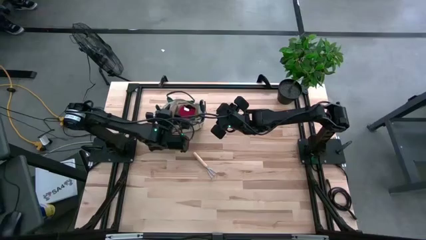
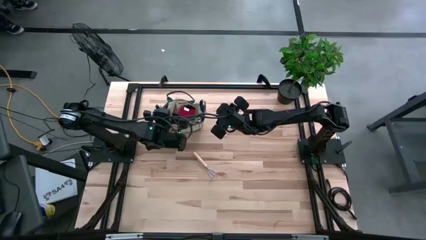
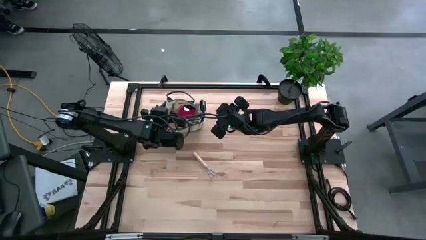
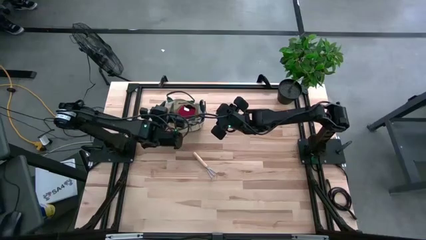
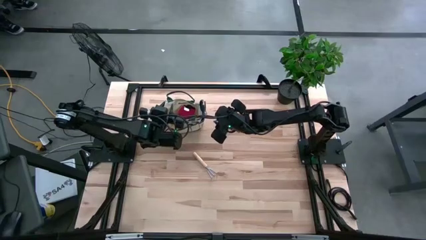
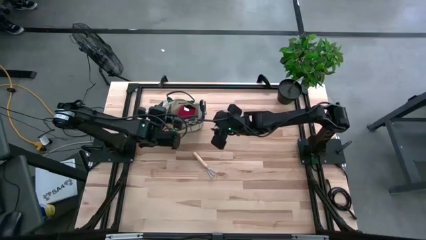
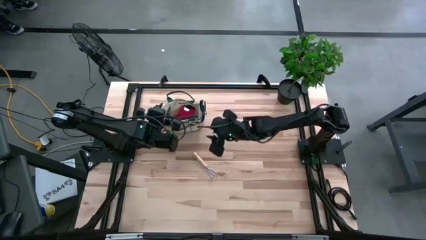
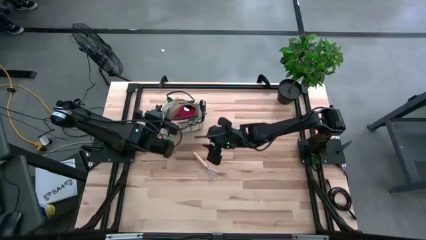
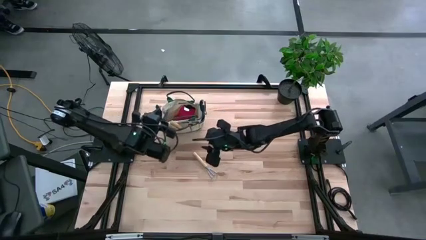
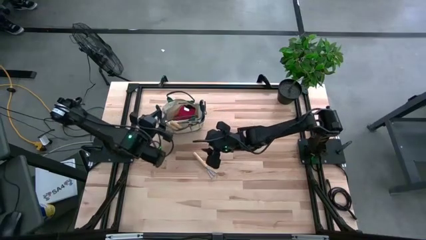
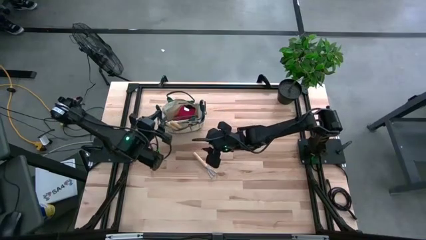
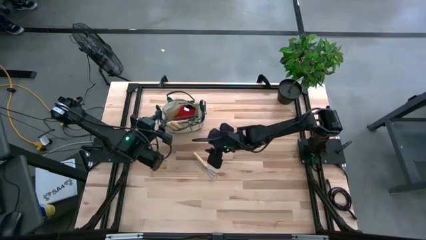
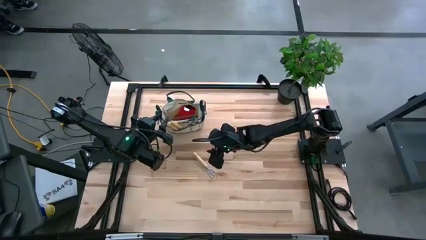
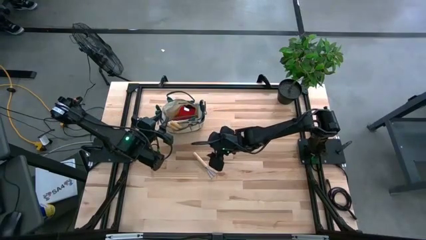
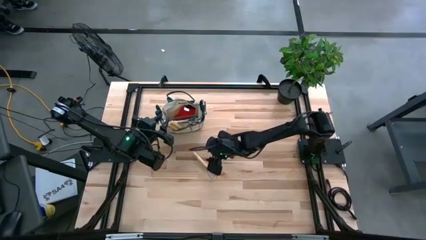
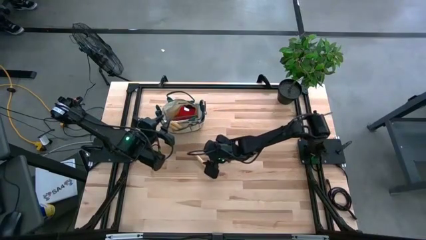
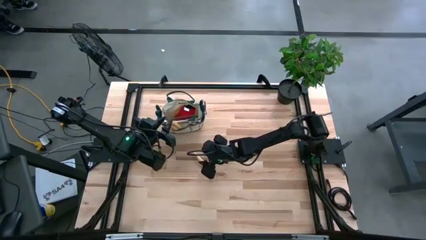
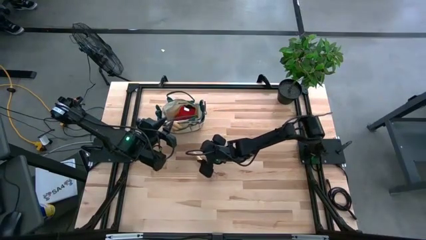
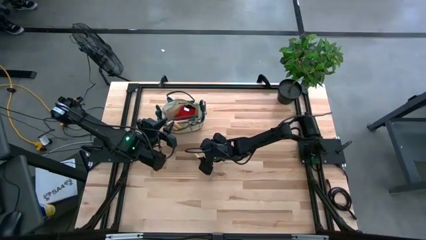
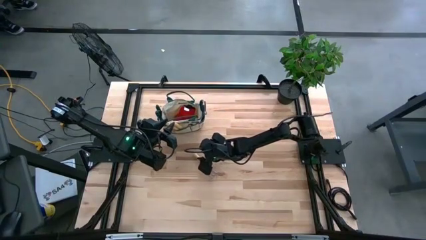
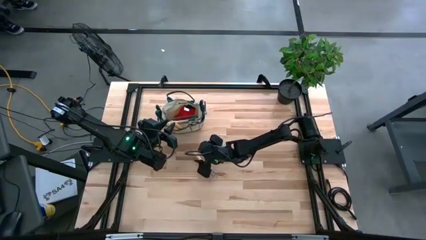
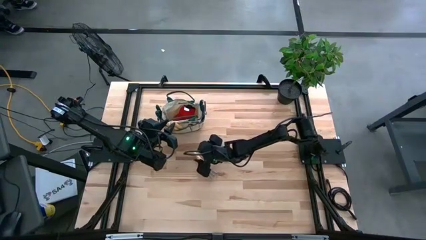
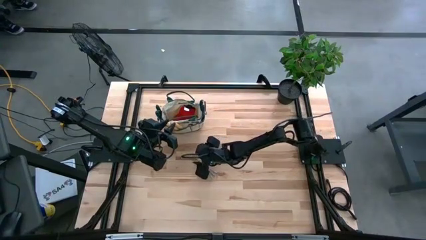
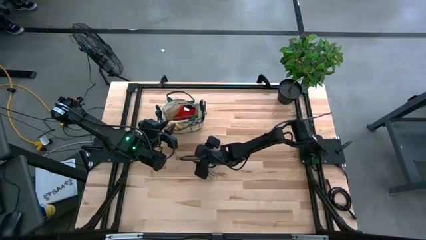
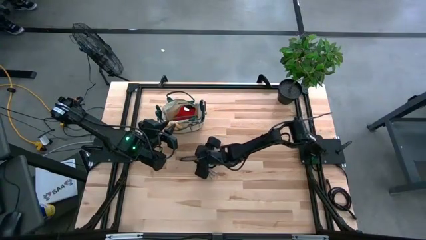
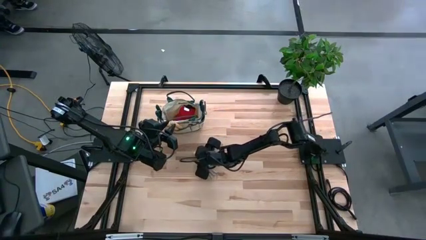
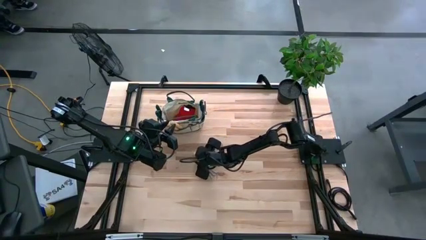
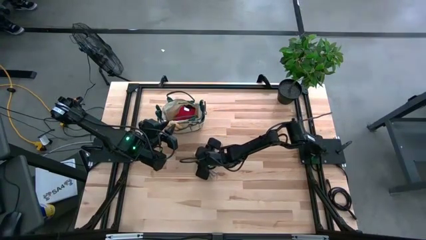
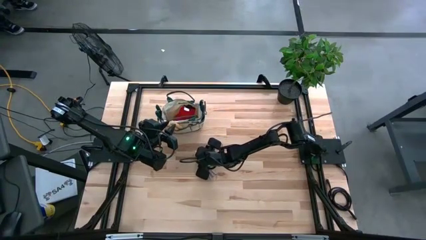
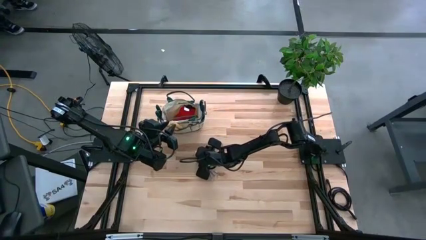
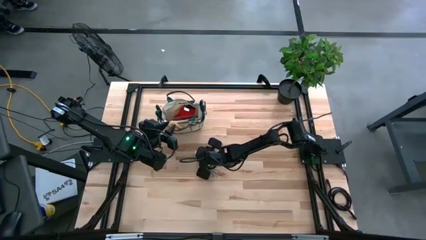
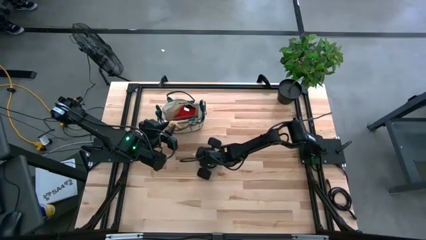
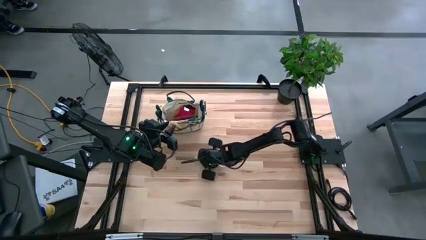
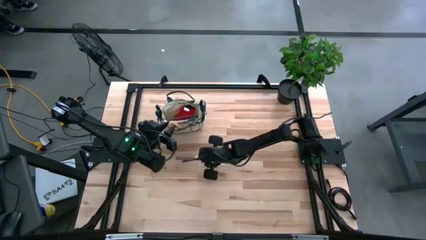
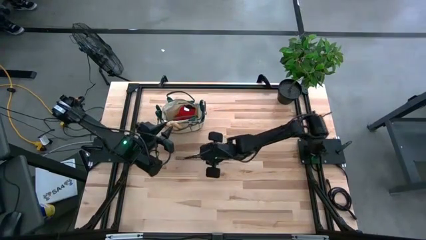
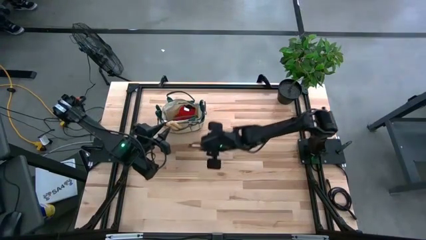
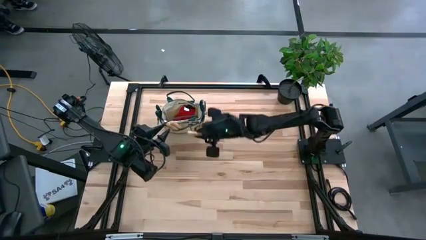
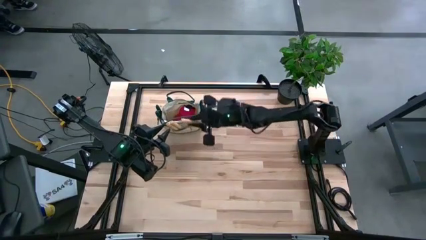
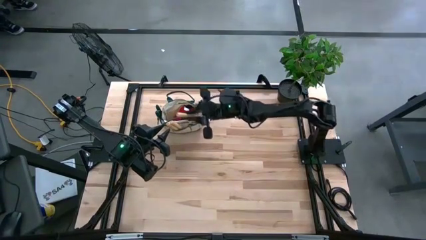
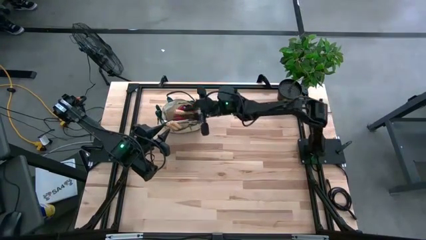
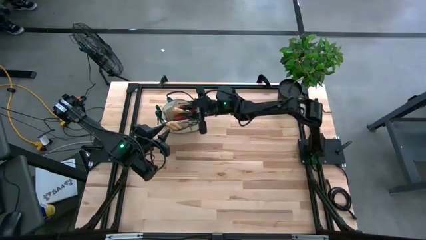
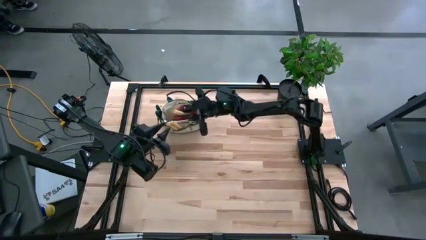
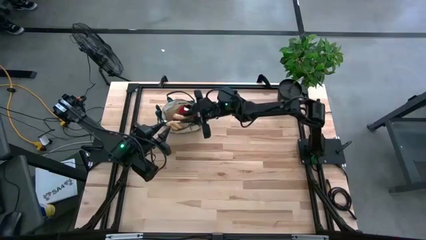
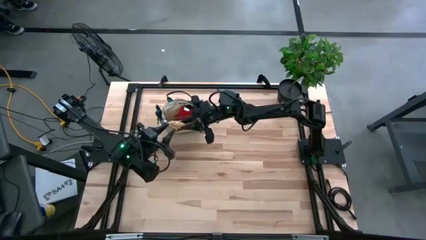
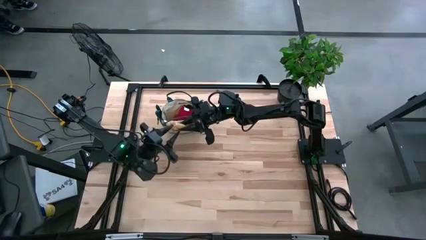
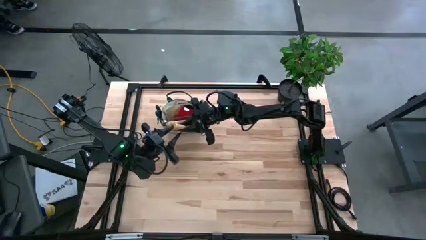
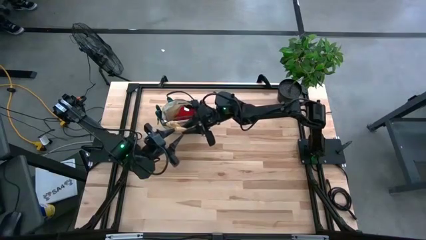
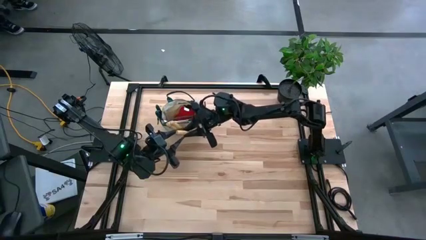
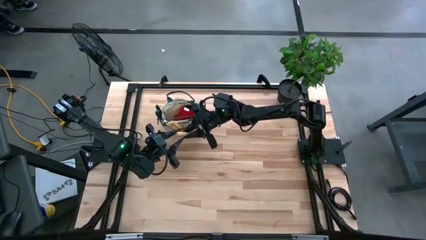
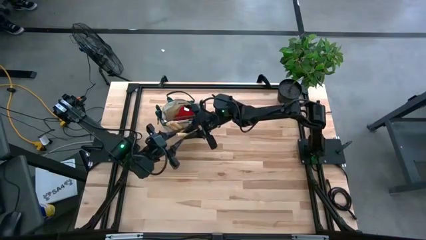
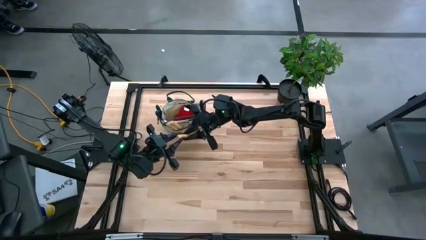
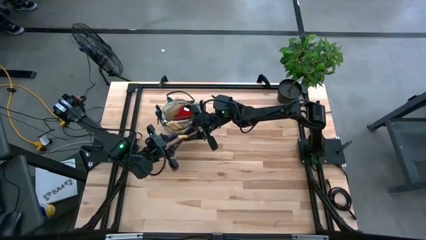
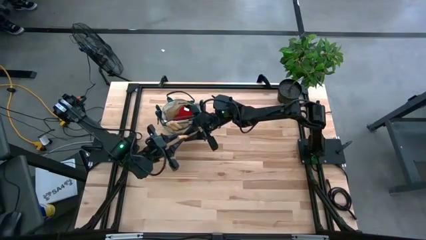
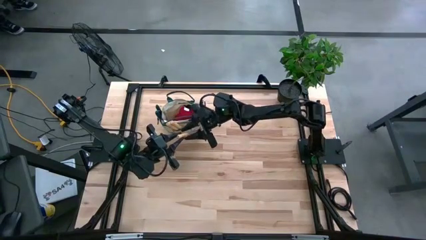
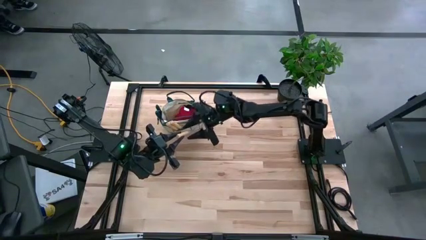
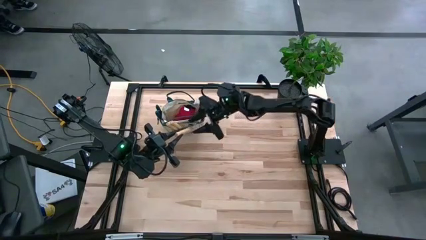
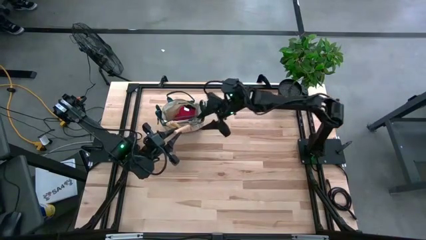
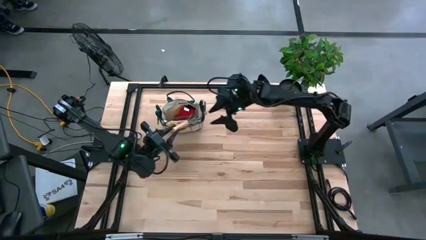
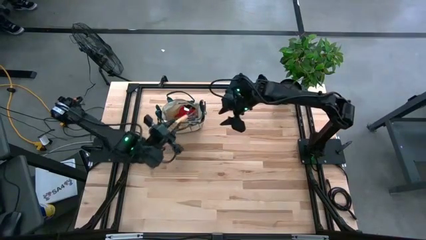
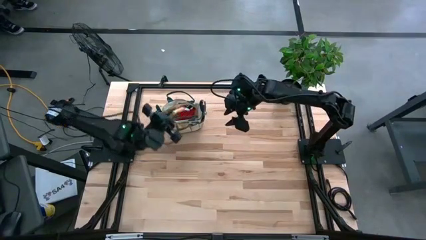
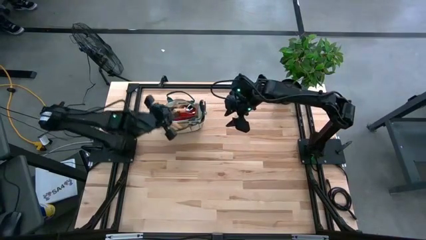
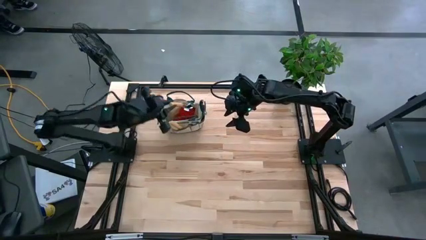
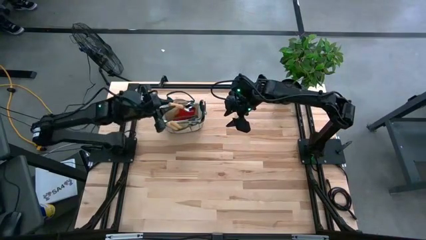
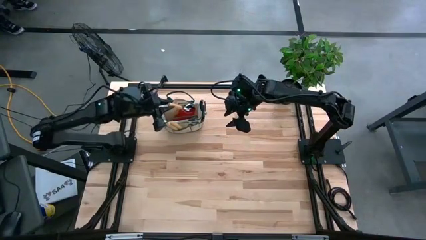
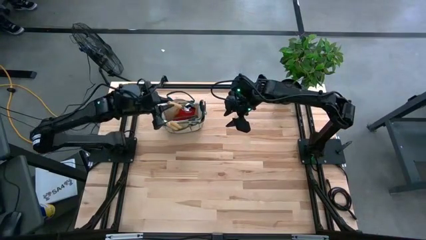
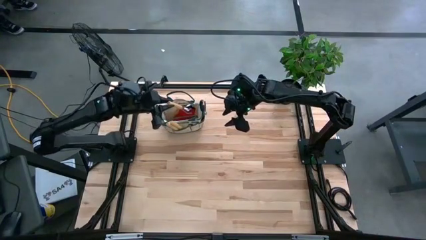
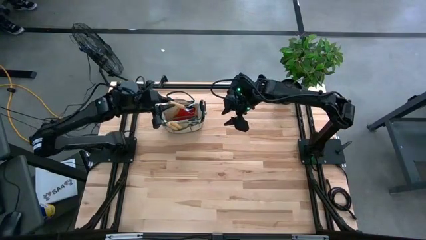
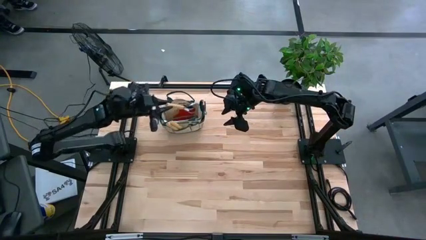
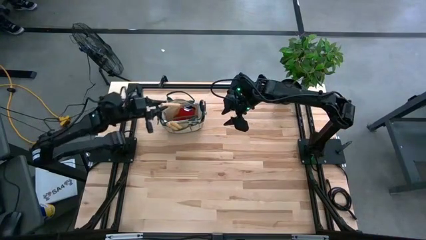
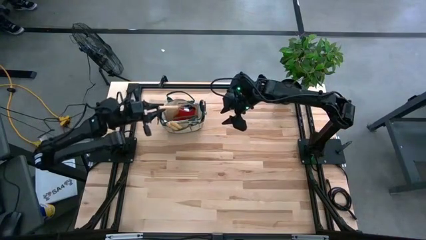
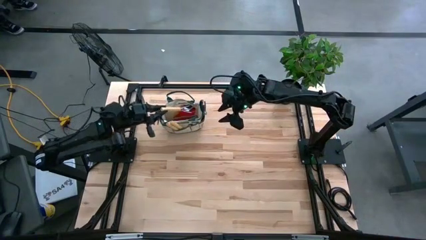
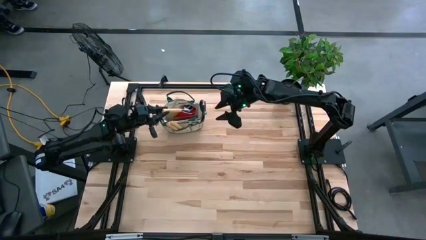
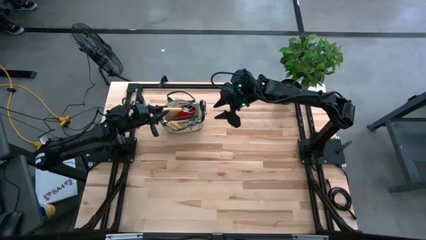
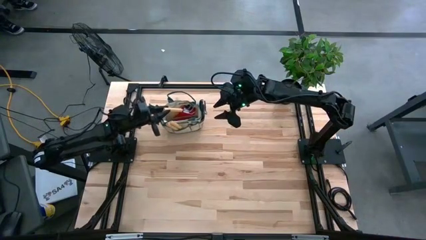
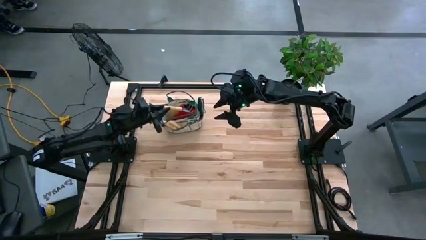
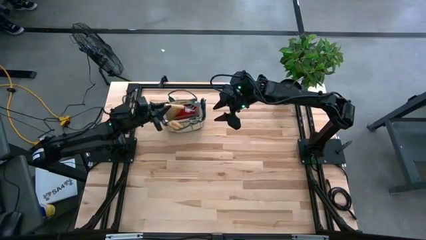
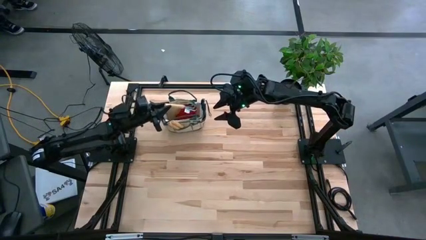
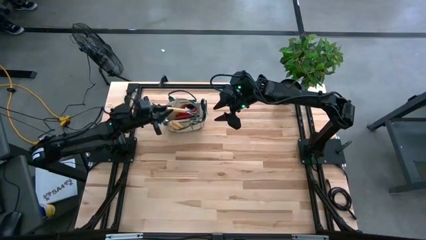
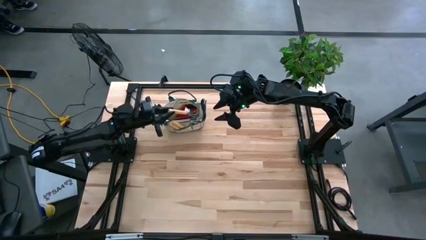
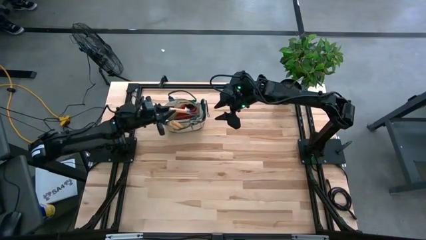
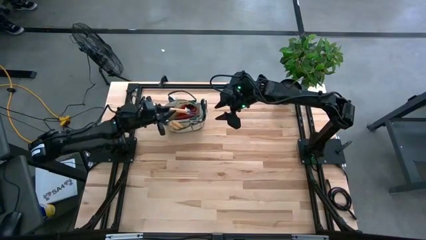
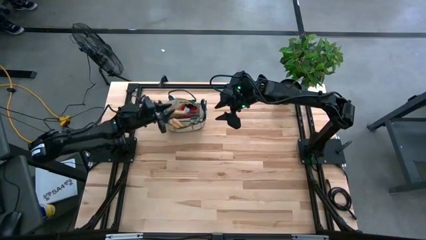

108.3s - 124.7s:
Task: Pick & Place Garden tools in Gardening bag
Put the brown hand rake into the gardening bag

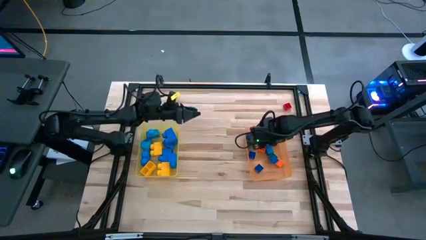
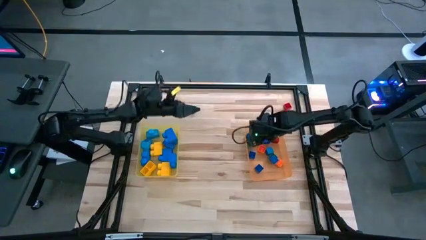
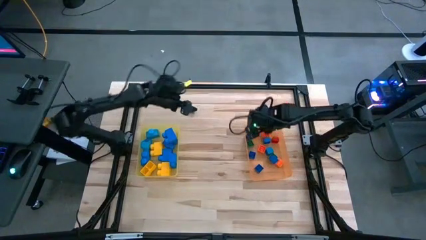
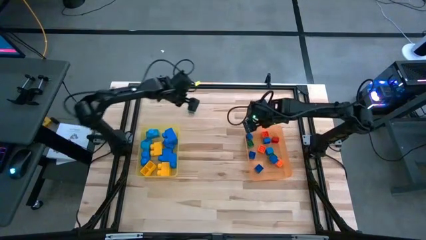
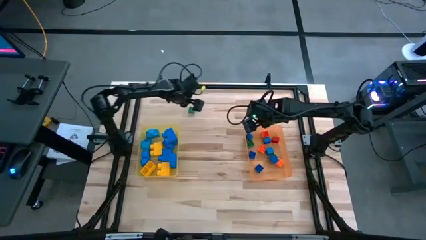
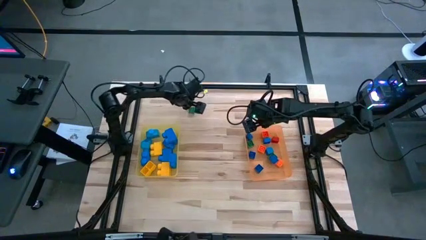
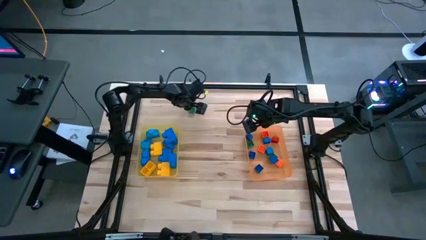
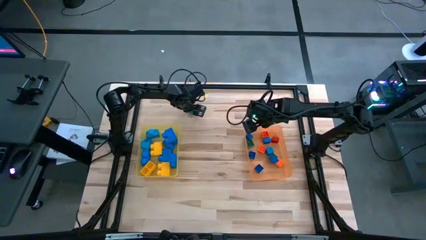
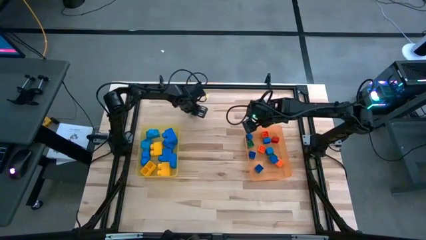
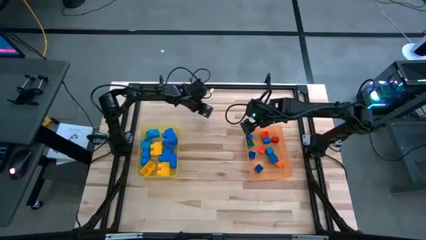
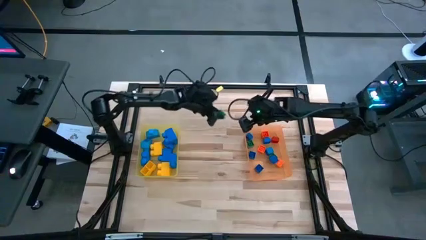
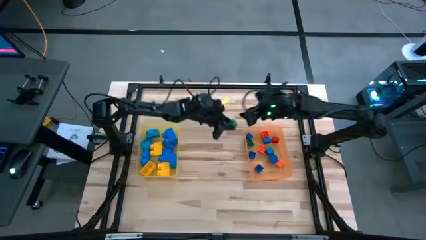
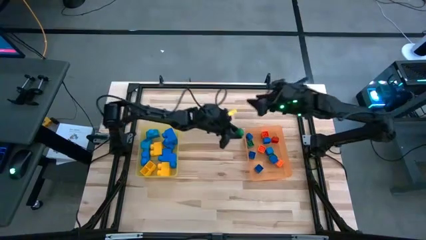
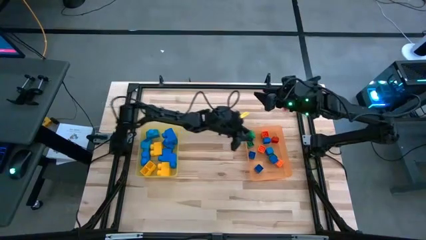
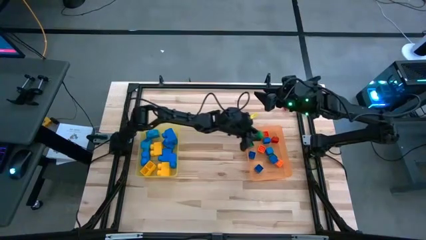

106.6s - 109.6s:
Task: Sort blocks by size
Put the small green game piece into the orange bin
